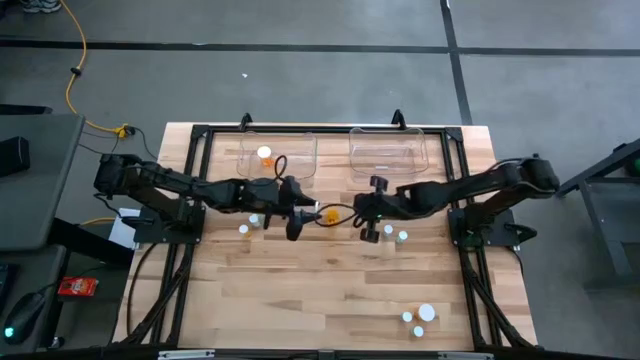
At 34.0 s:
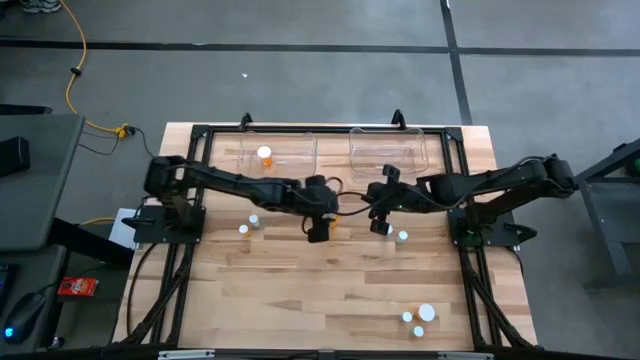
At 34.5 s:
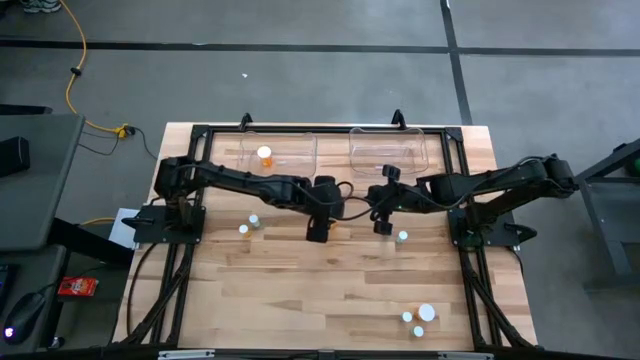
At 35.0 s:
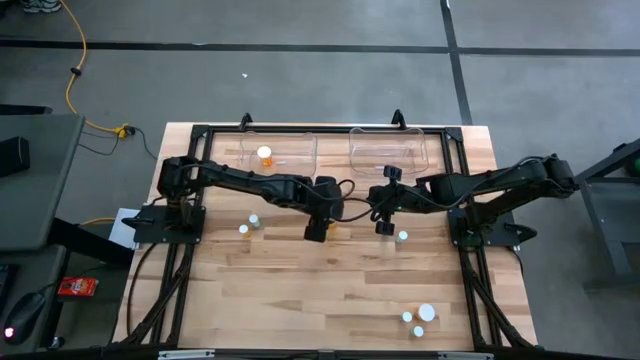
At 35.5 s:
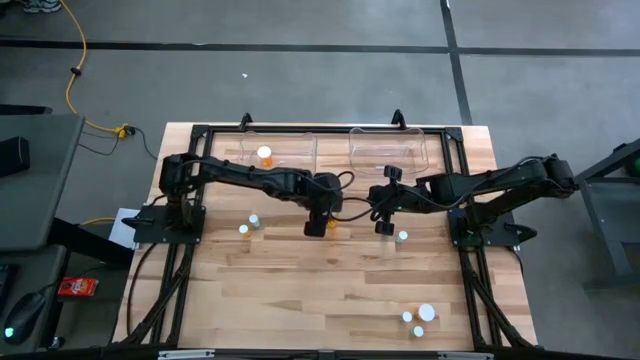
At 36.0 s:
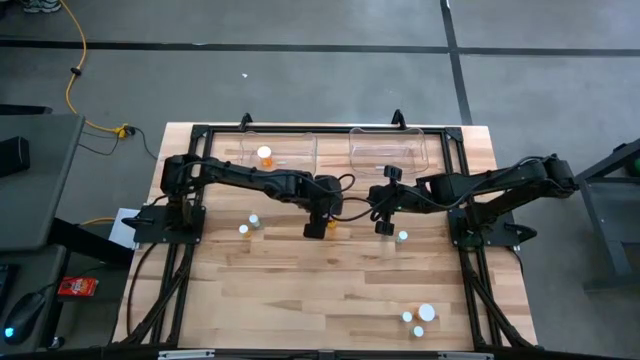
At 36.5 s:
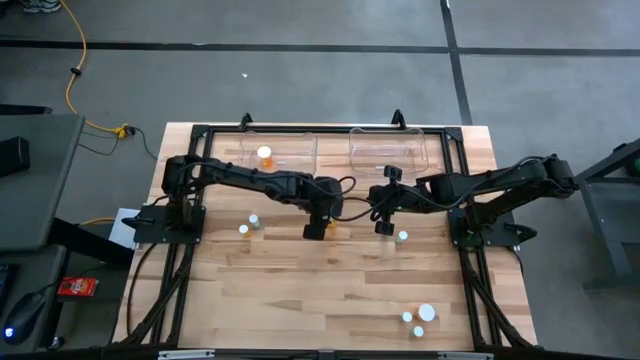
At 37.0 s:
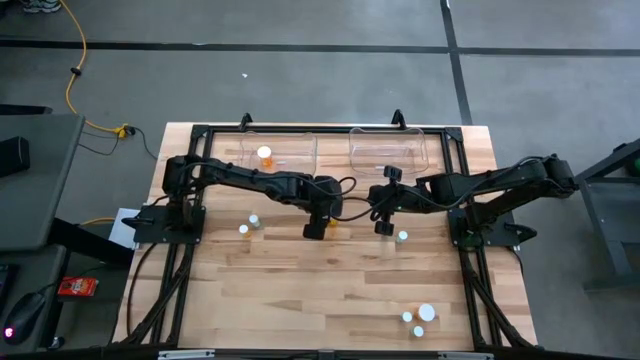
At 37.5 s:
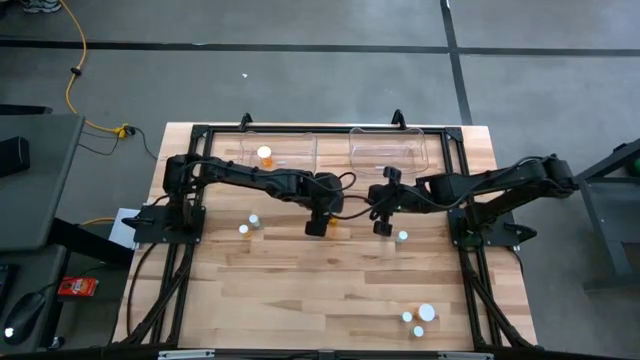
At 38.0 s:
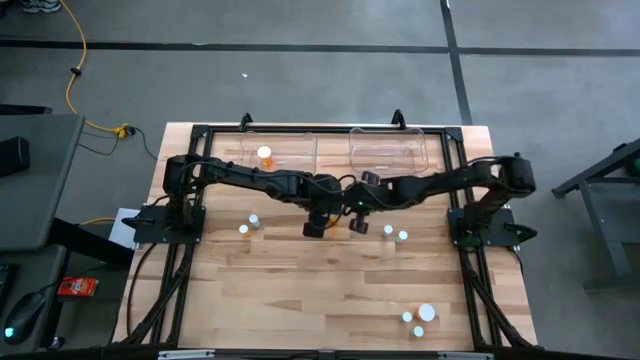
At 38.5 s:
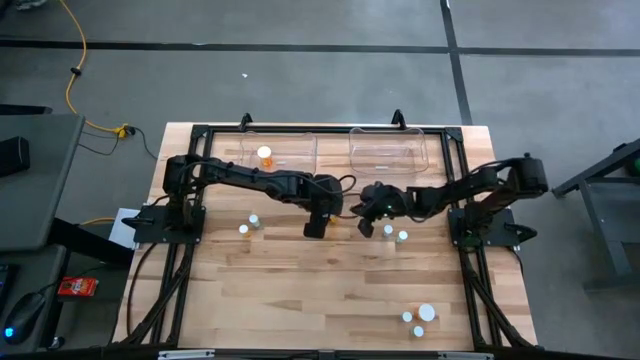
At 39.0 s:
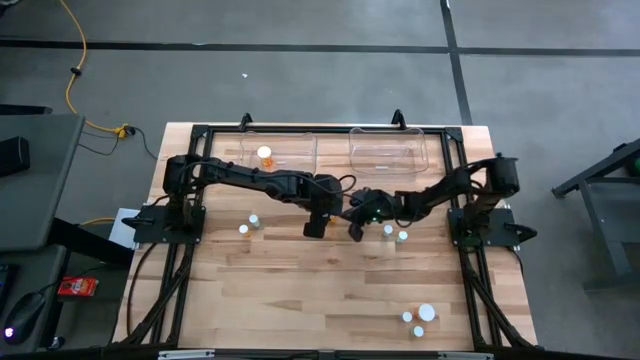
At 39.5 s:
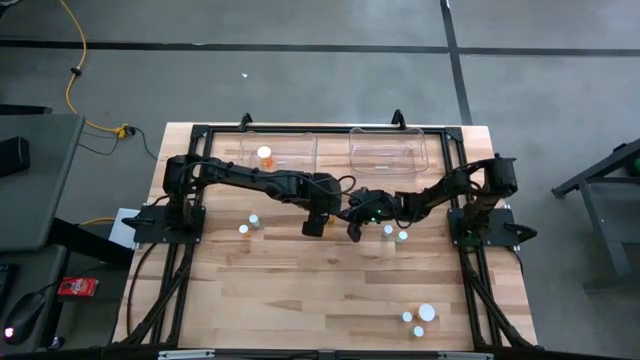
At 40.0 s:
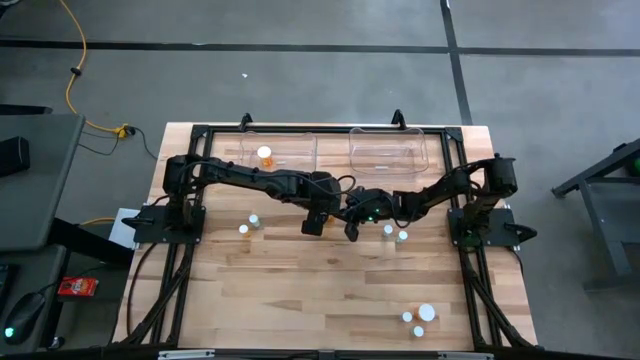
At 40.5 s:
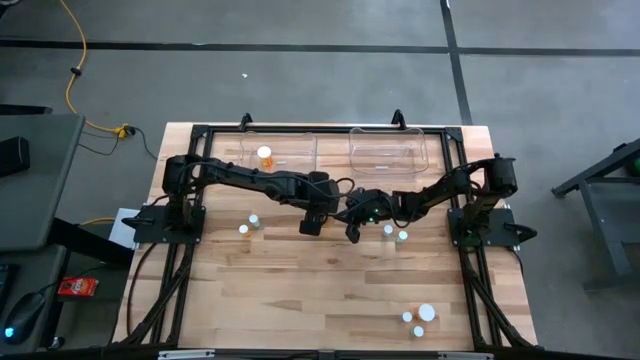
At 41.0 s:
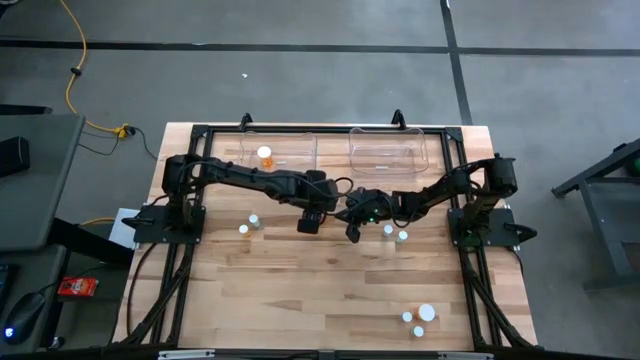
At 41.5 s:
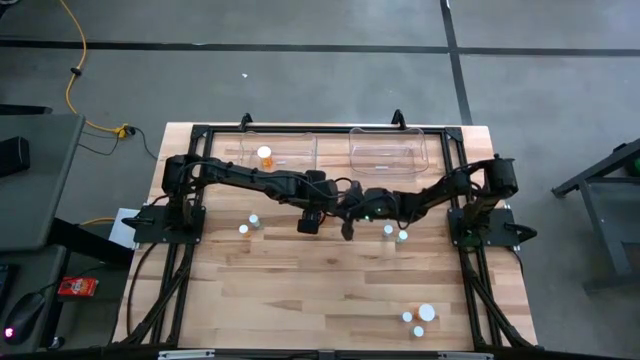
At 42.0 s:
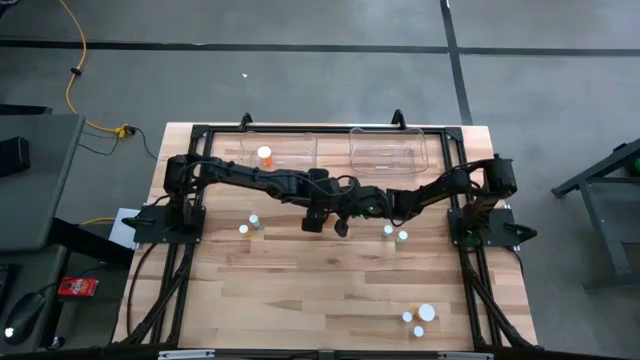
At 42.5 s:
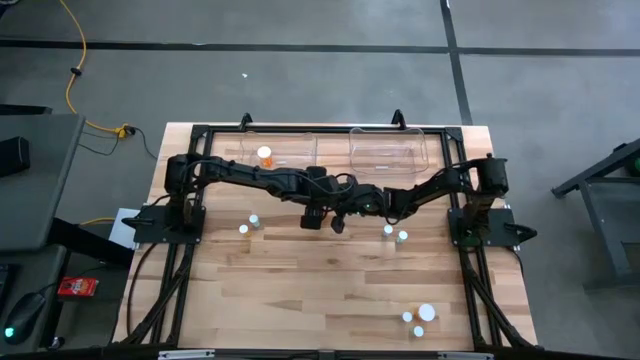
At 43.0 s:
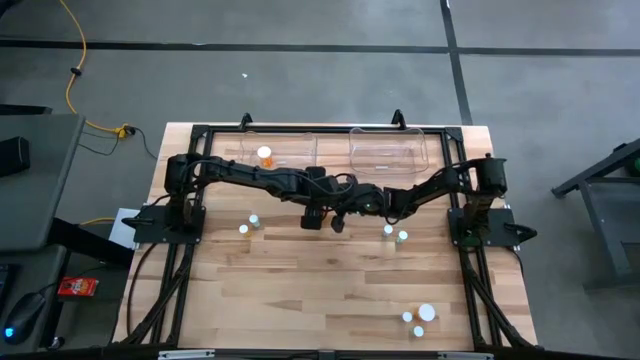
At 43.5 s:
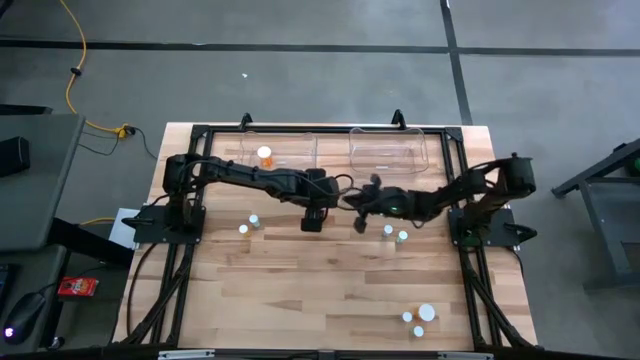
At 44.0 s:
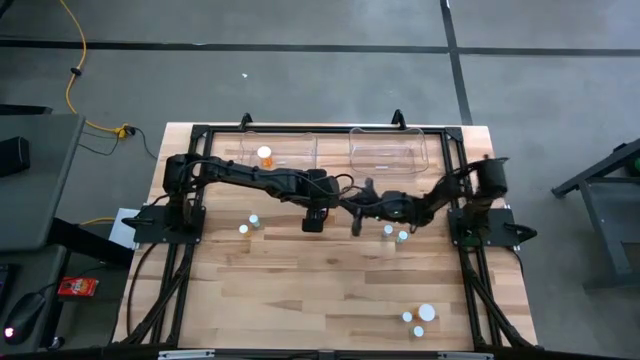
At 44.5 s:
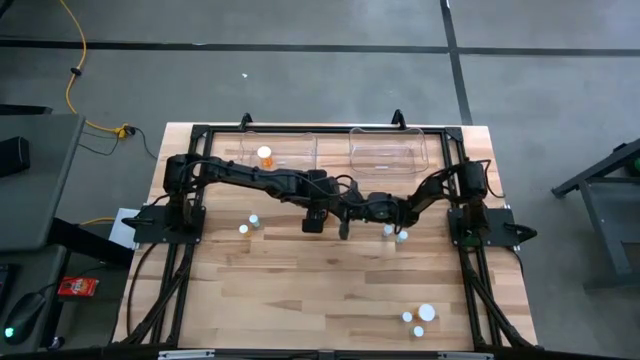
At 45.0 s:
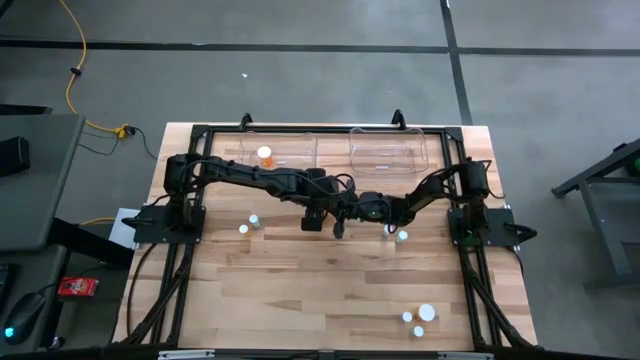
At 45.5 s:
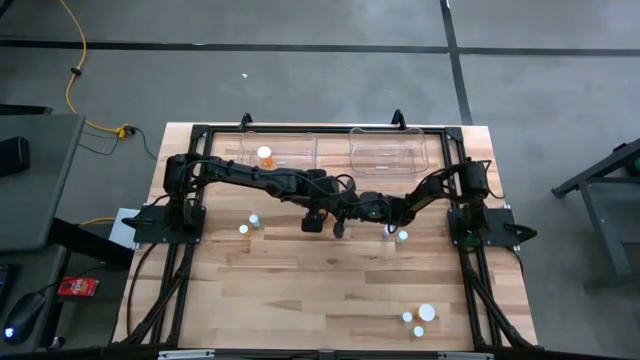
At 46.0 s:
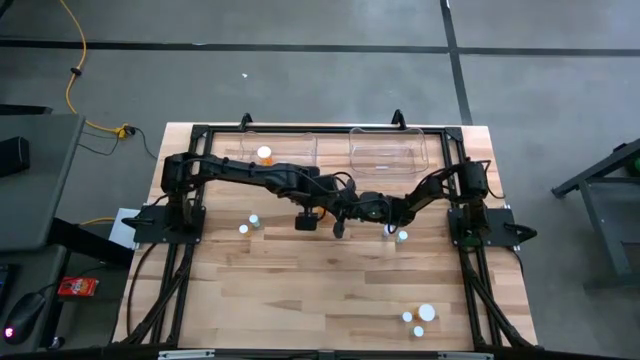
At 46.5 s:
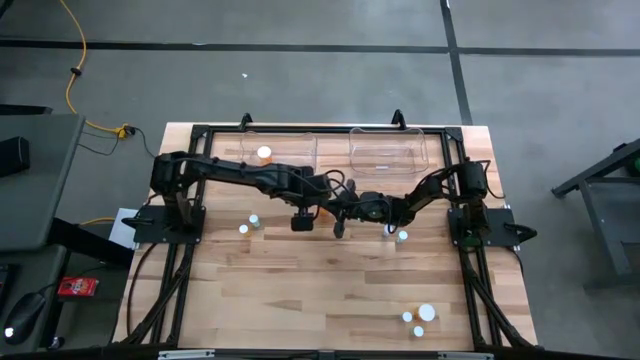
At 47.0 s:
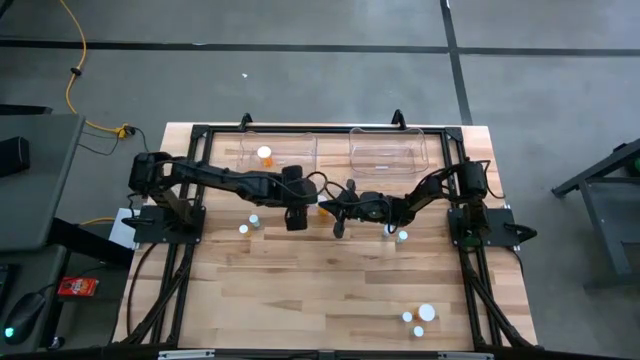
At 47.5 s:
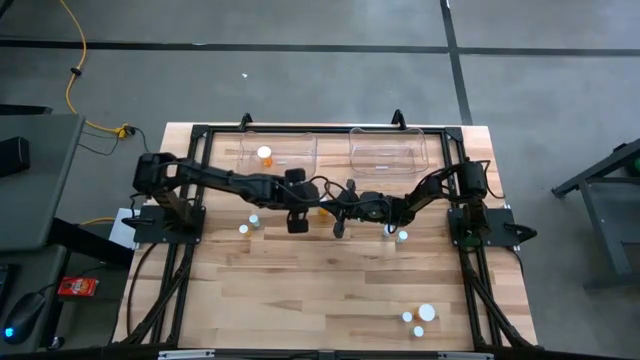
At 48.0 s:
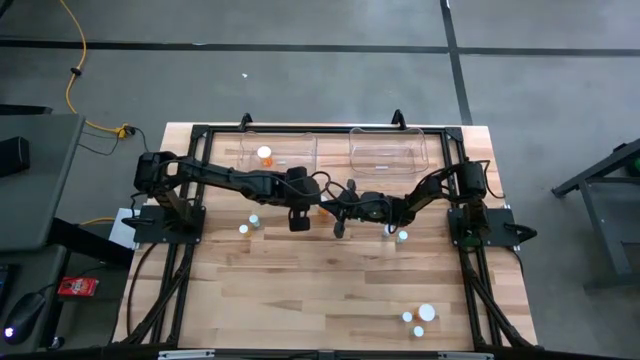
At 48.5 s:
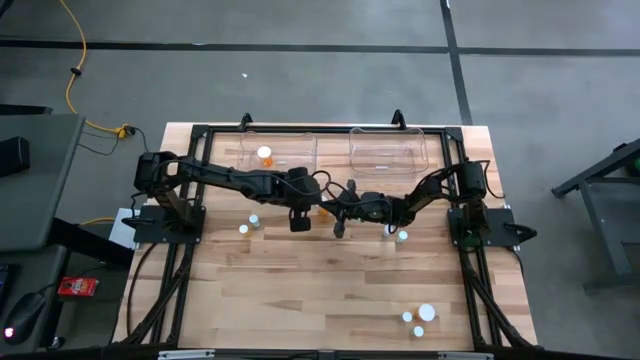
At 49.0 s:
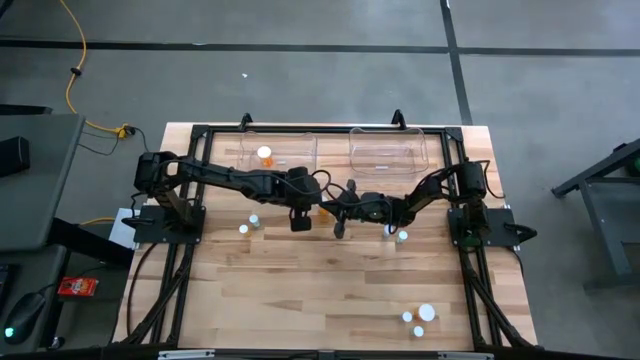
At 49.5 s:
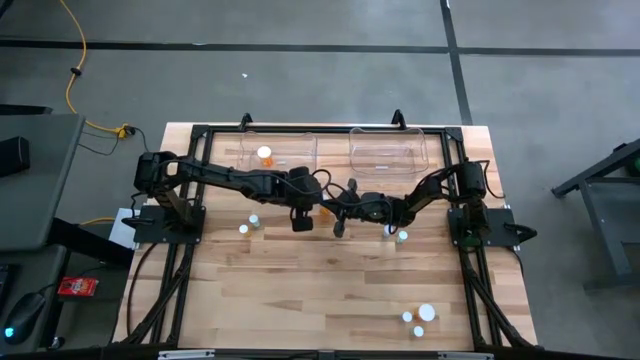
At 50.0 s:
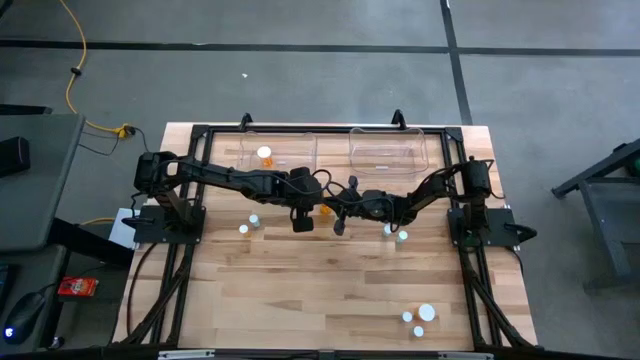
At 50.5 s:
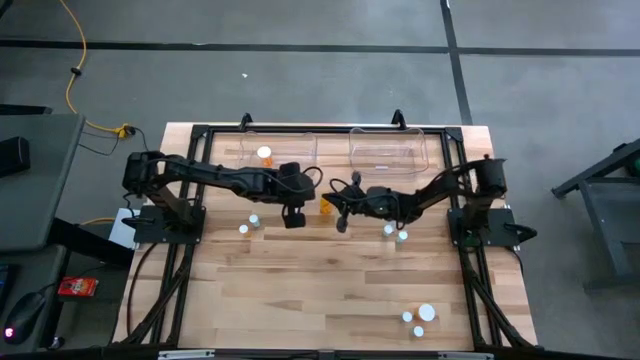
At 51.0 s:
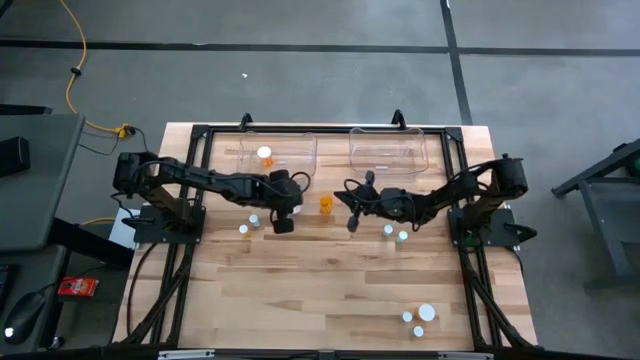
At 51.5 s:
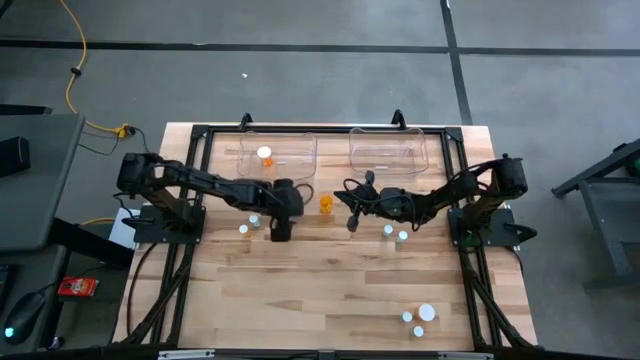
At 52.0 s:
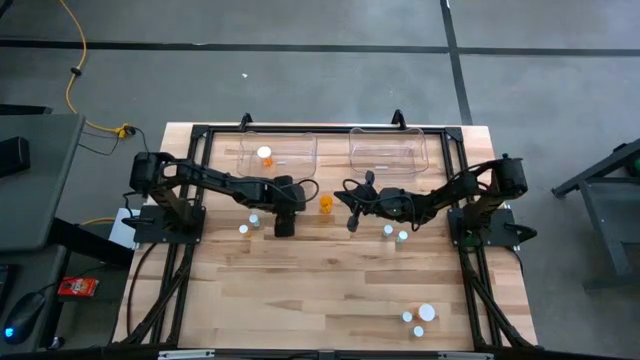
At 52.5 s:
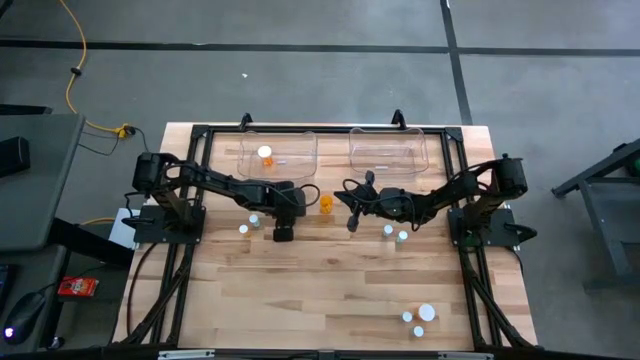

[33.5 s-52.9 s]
Task: Pick and place medicine bottles into bin by pill shape (circle, oval)
Put the top orange capsule bottle into the left transparent bin

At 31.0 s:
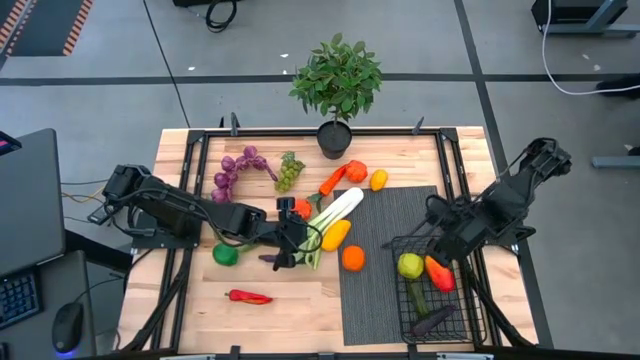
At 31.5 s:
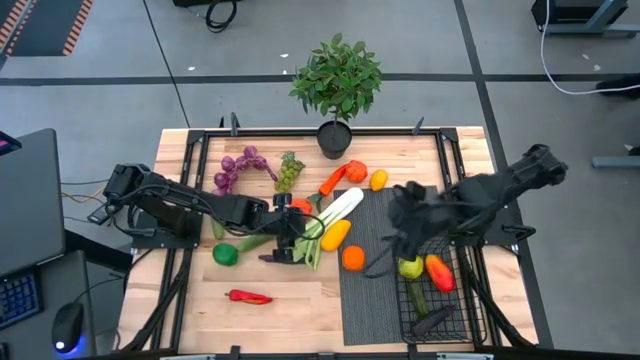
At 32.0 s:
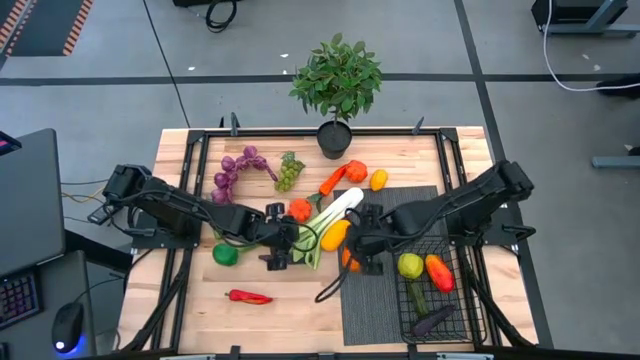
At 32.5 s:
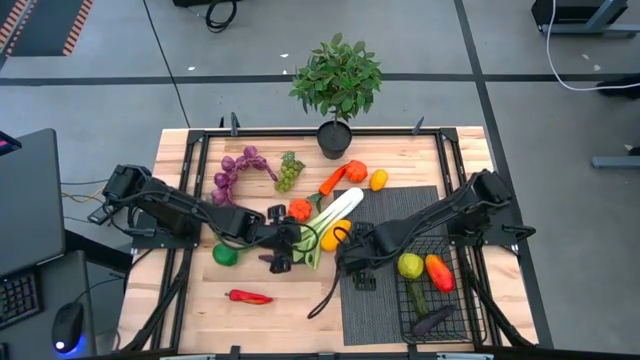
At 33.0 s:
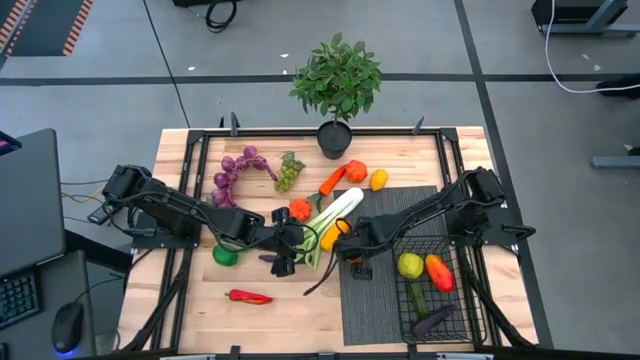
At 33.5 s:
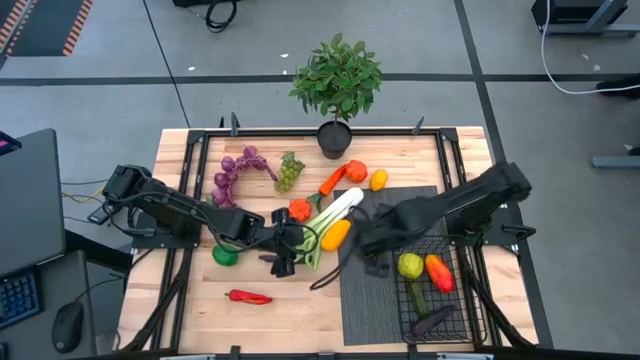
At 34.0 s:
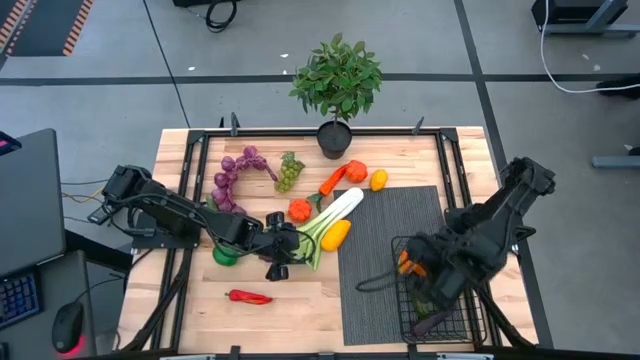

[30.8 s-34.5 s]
Task: Build produce basket
Put the orange into the black wire basket
